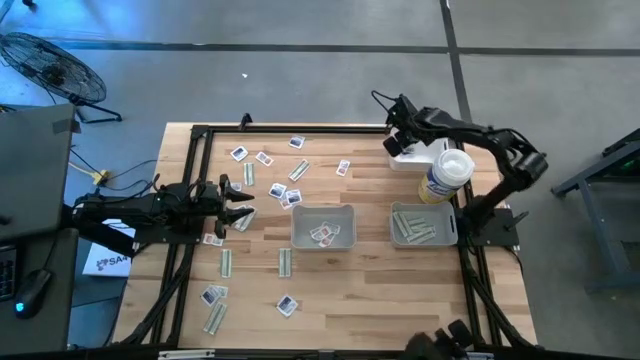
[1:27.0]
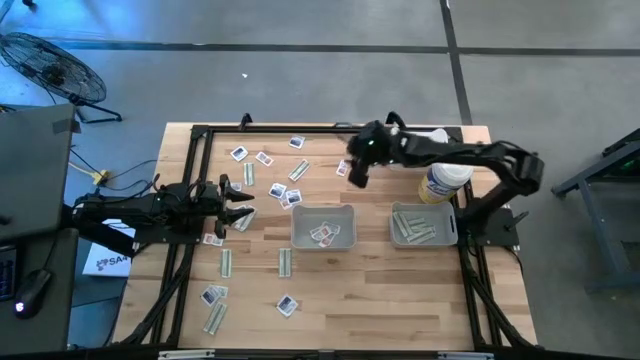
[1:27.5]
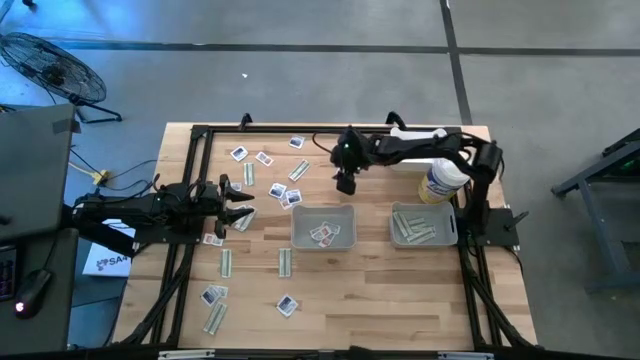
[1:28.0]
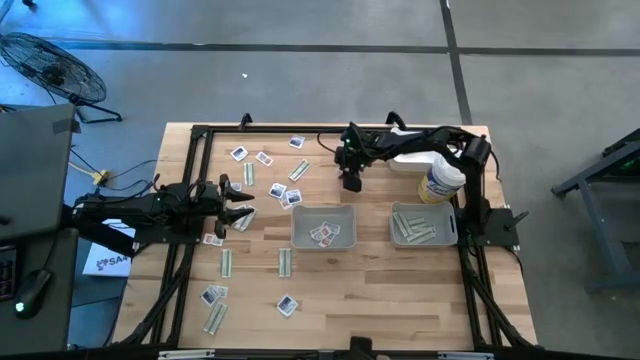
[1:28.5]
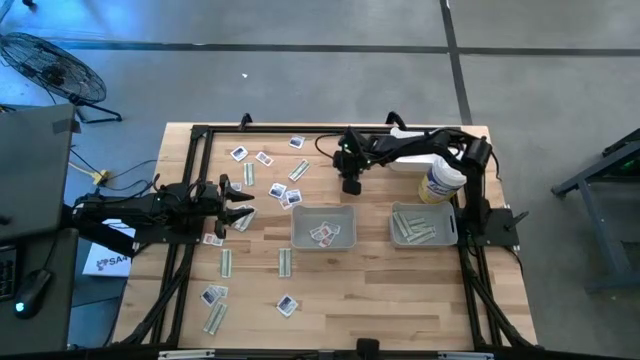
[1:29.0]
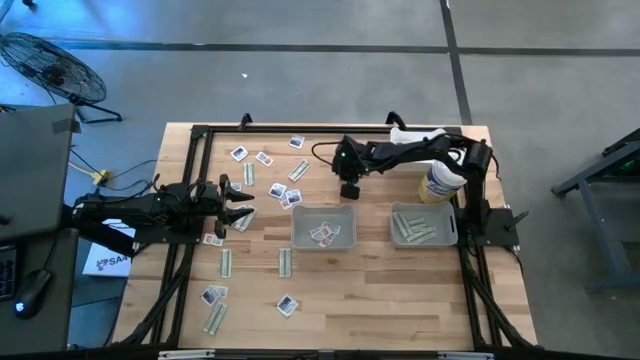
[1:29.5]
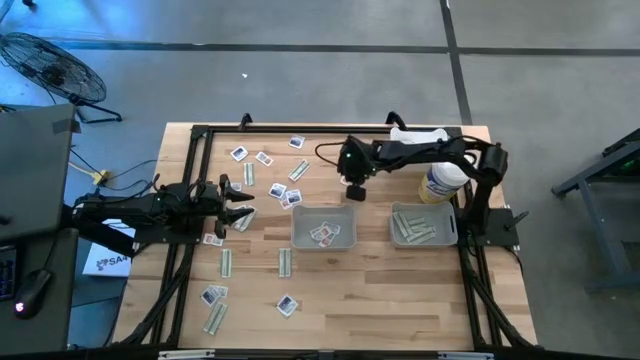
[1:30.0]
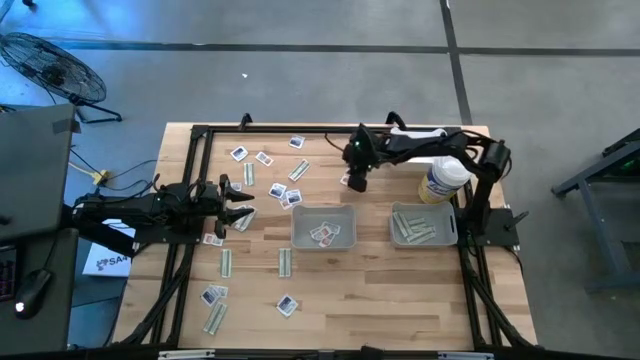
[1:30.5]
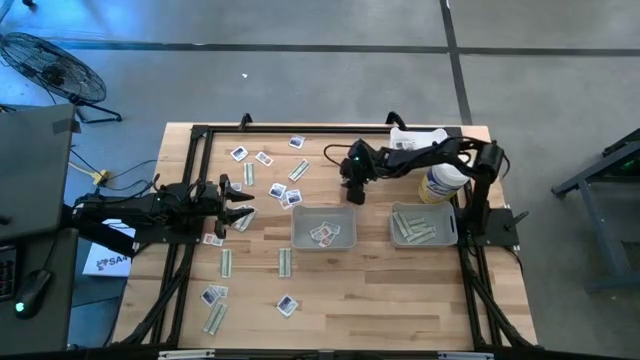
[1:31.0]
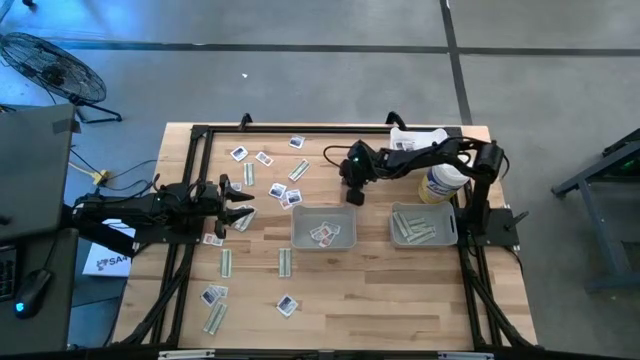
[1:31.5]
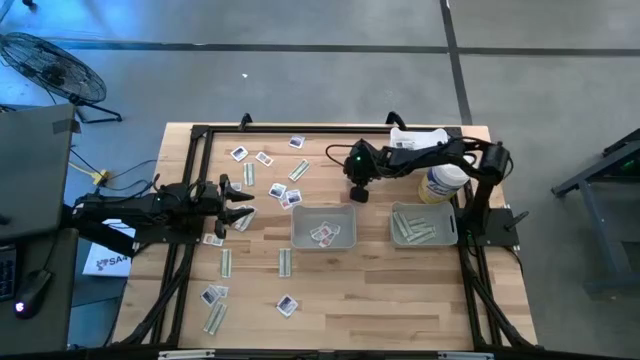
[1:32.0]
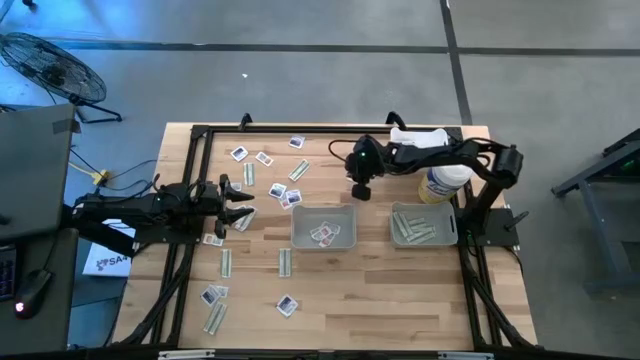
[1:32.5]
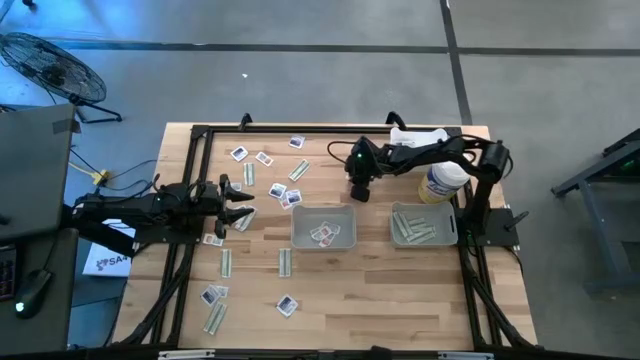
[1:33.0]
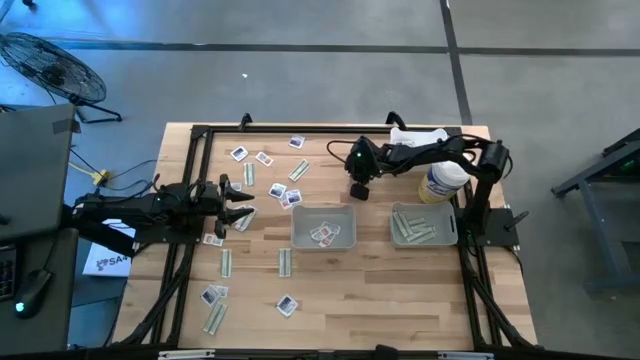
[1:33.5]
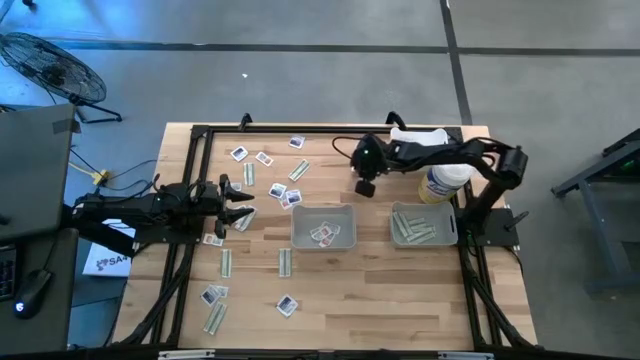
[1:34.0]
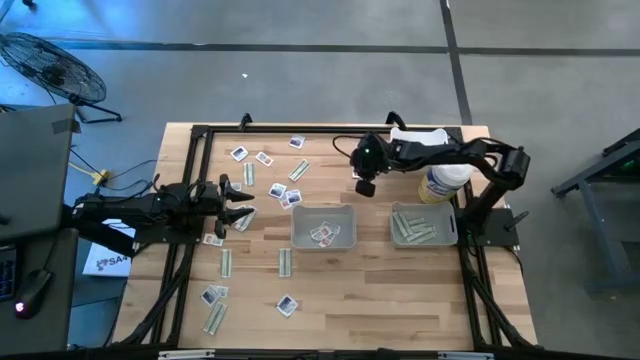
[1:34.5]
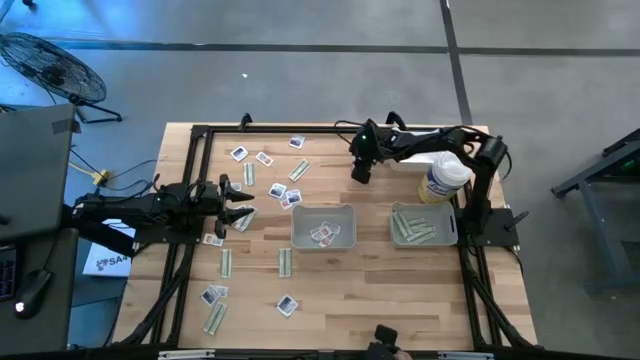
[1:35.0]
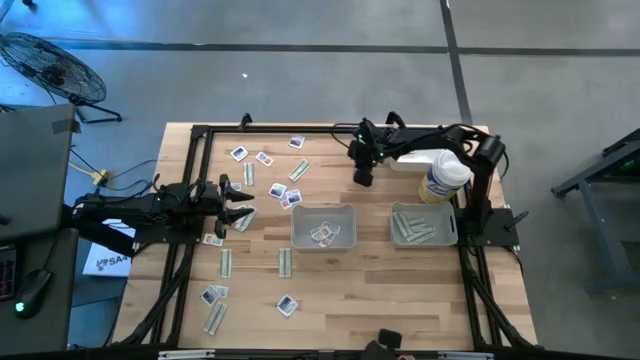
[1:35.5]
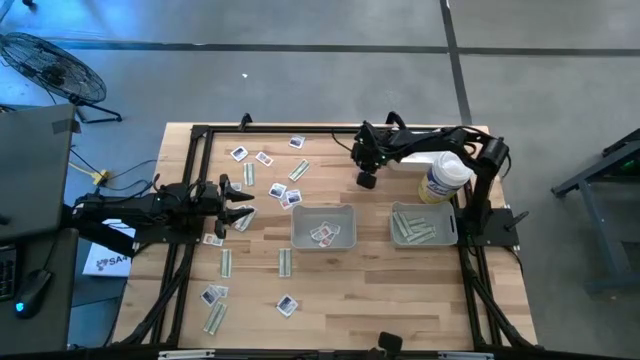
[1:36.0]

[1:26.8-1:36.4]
Task: Pick & Place First Aid Supplies
Put the orange pad into the left gray bin

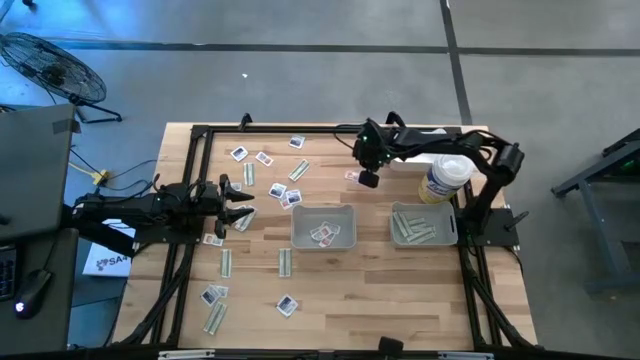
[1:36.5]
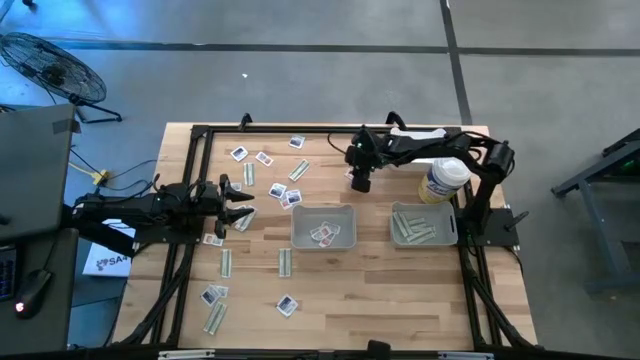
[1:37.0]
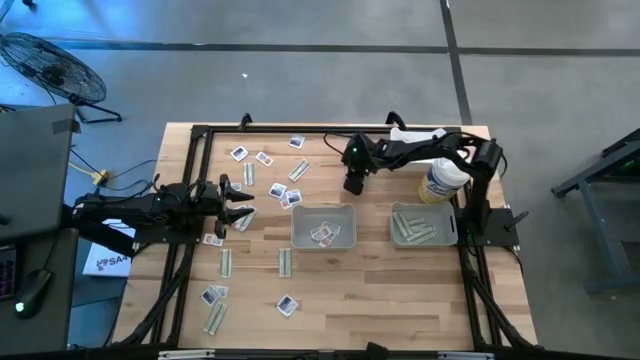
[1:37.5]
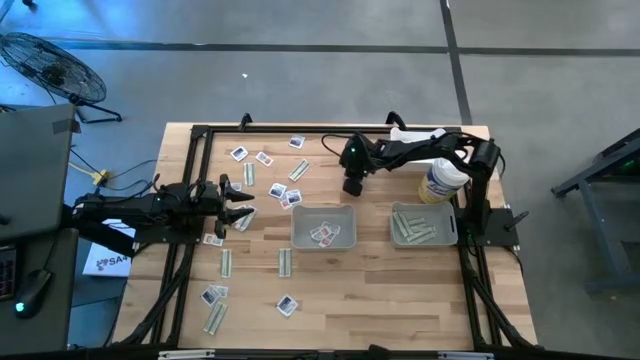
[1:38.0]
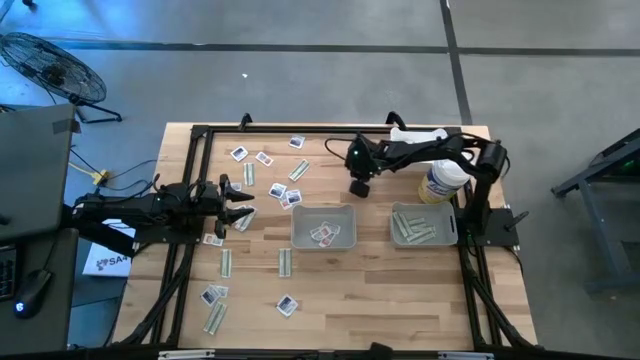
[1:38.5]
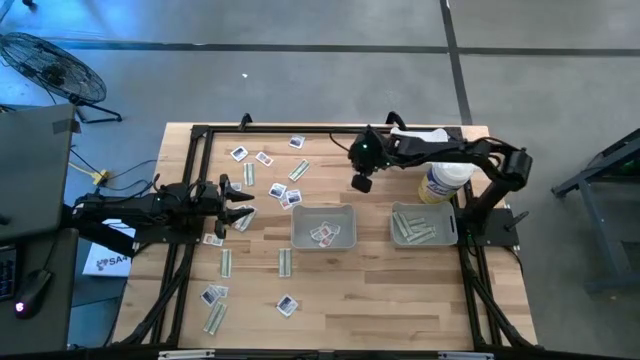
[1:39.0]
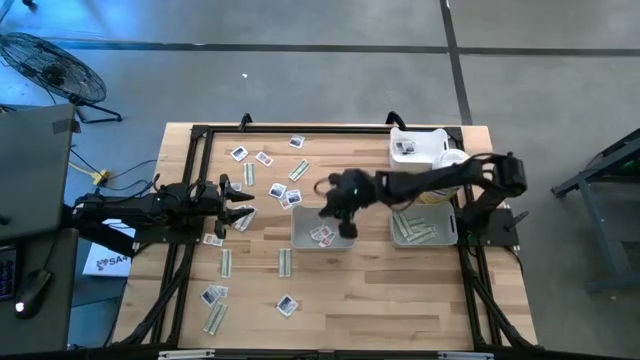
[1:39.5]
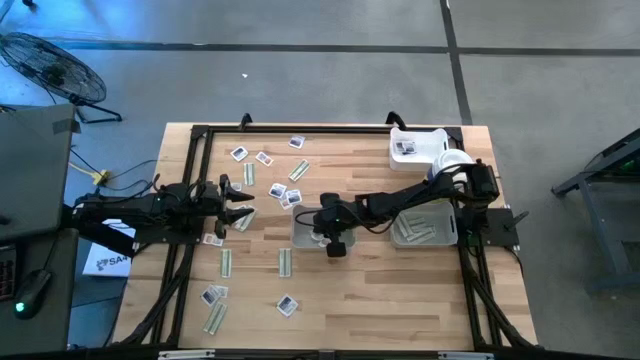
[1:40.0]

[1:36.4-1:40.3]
Put the orange pad into the left gray bin

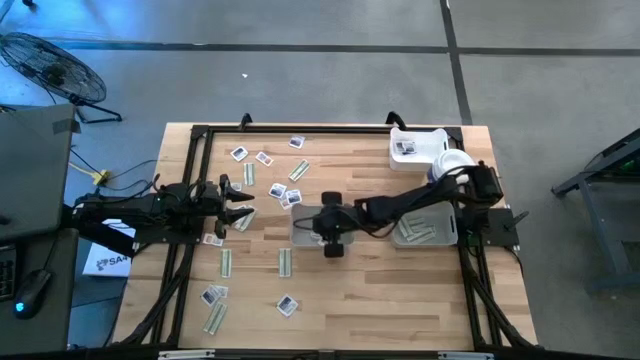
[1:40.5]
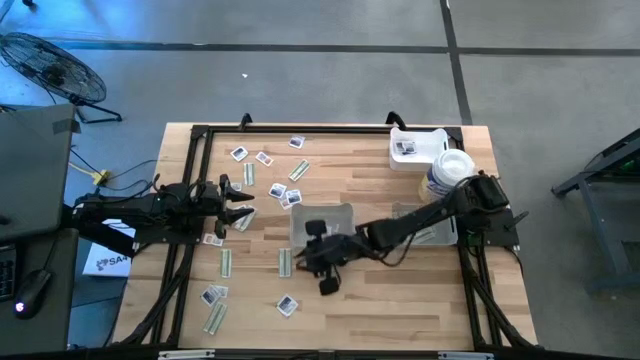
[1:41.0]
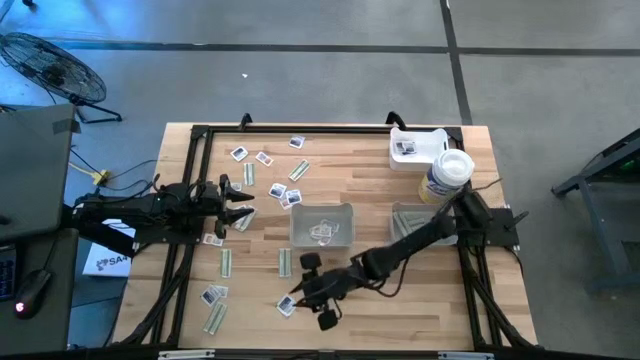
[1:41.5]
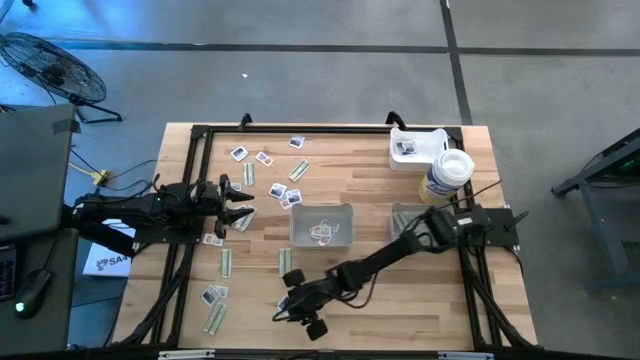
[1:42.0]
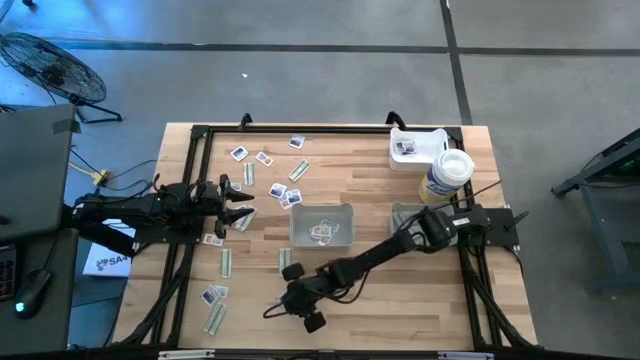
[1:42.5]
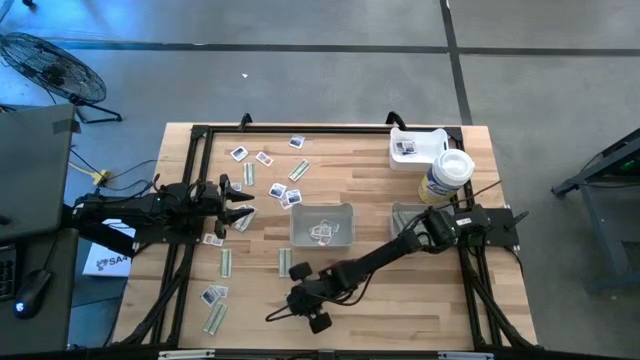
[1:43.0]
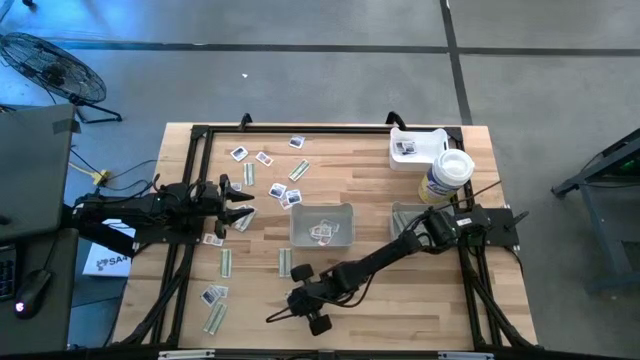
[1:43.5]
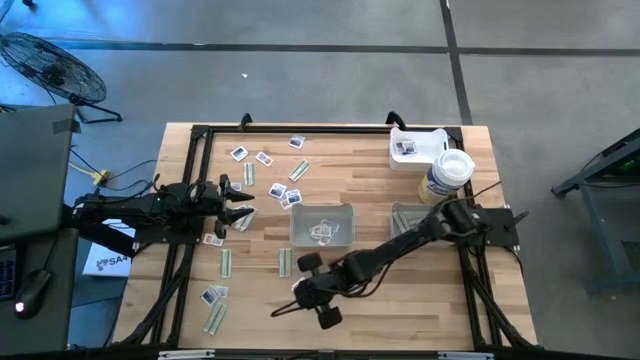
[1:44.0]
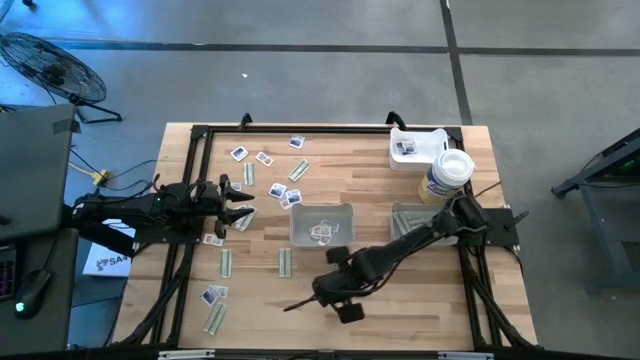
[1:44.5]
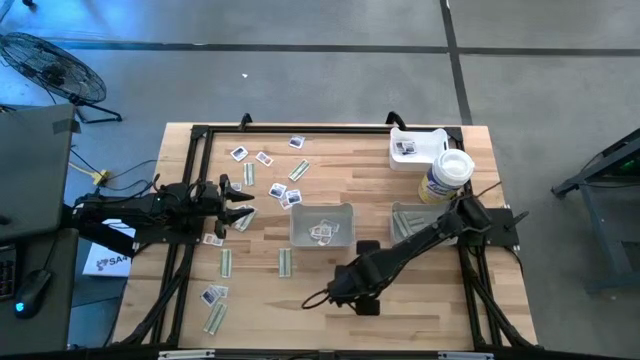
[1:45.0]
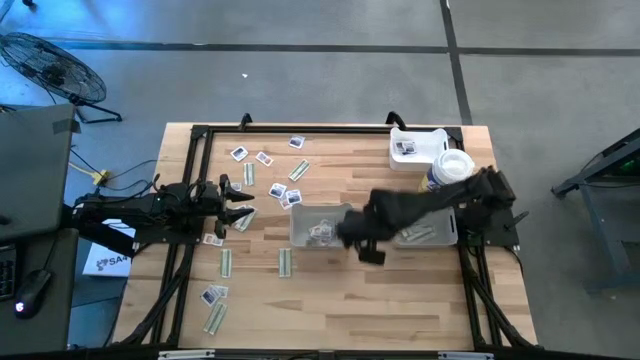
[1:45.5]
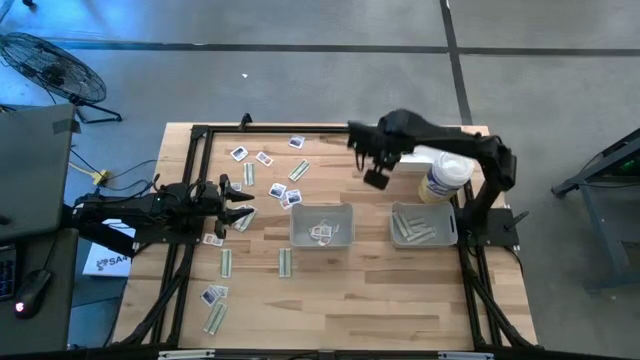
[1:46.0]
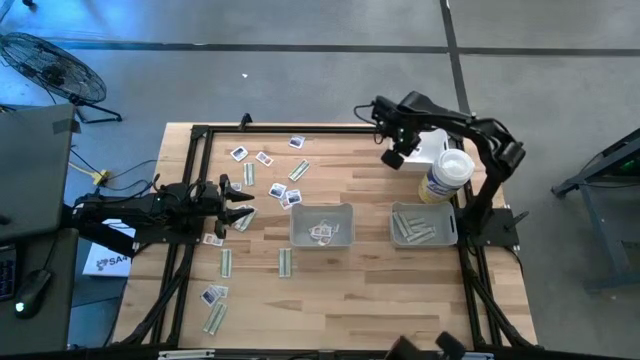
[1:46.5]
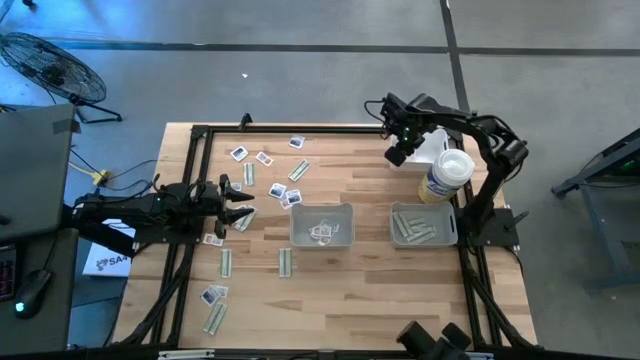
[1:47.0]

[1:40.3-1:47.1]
Put the blue pad into the white bin

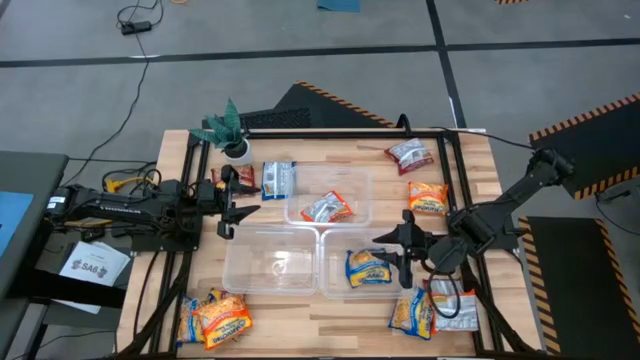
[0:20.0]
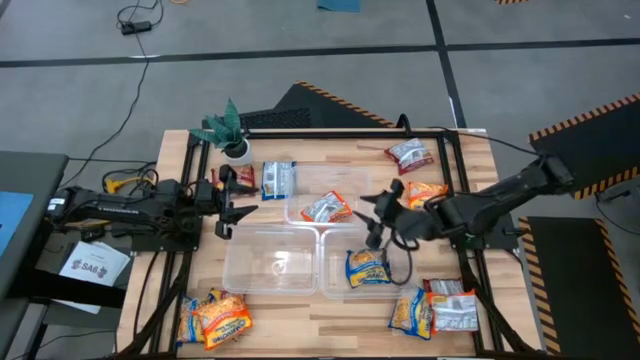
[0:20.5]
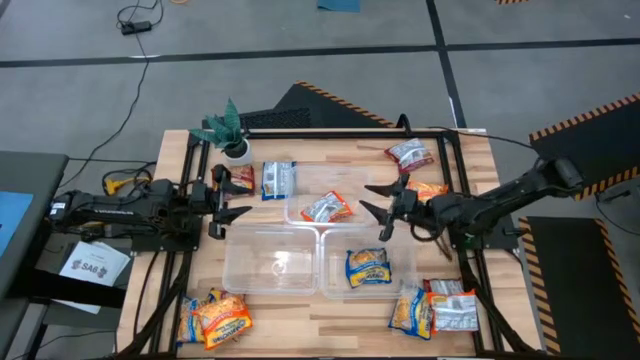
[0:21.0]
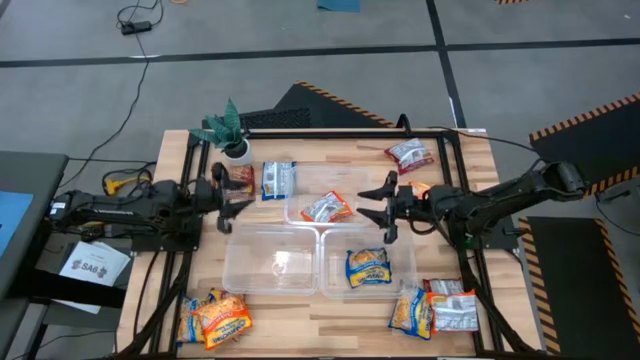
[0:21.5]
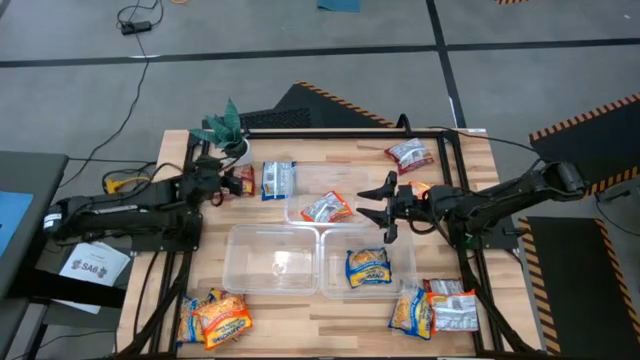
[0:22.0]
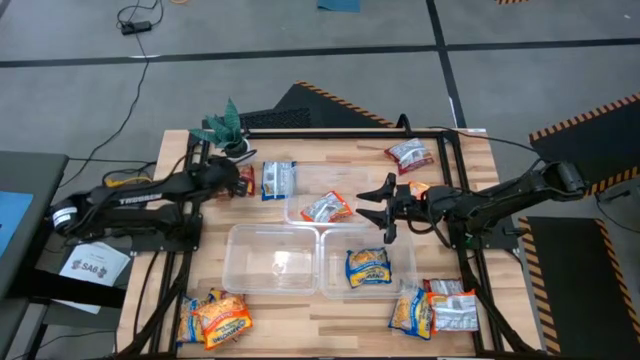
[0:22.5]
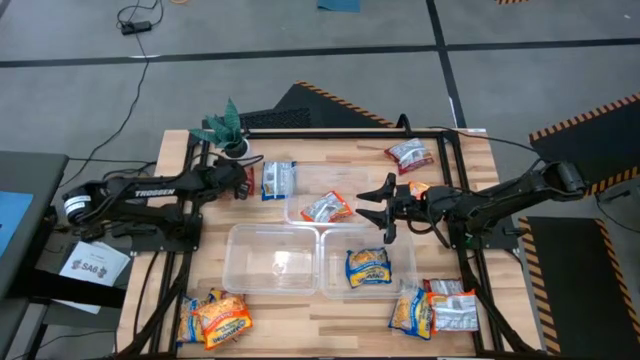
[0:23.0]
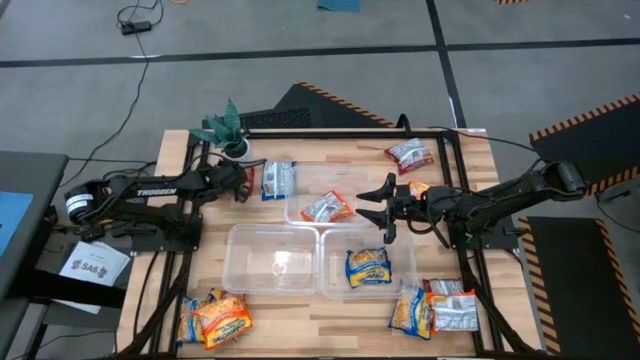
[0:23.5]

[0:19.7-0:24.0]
Task: Sort Maruchan noodles
Put the red noodle pack into the bottom left transparent bin
